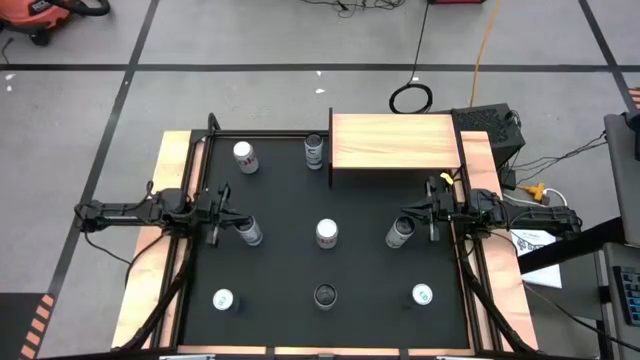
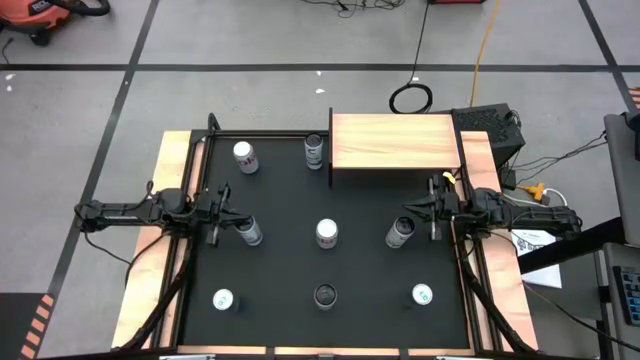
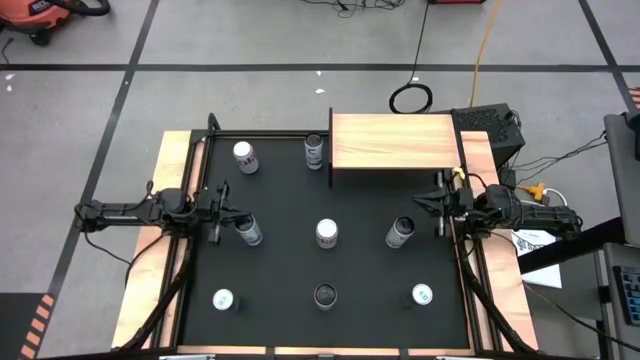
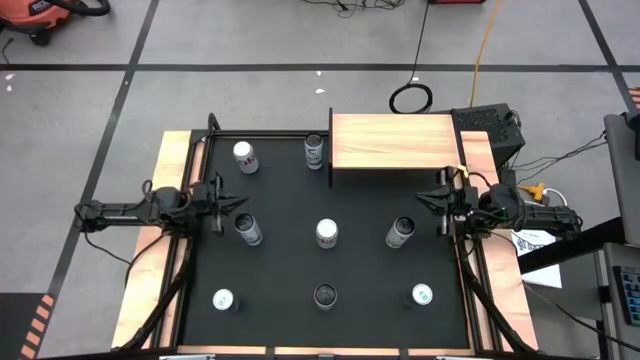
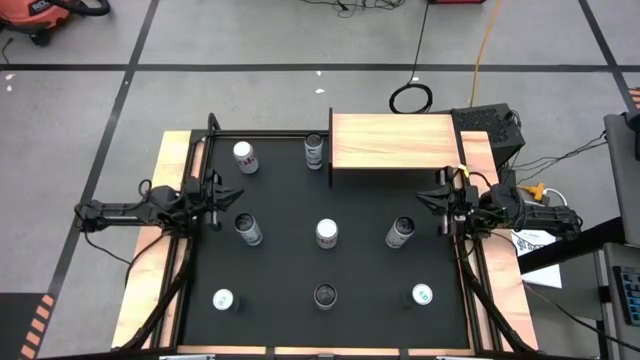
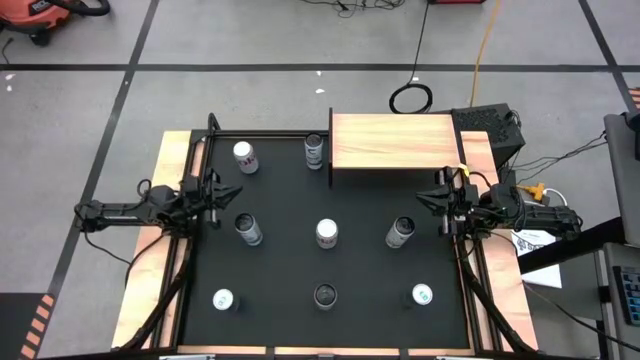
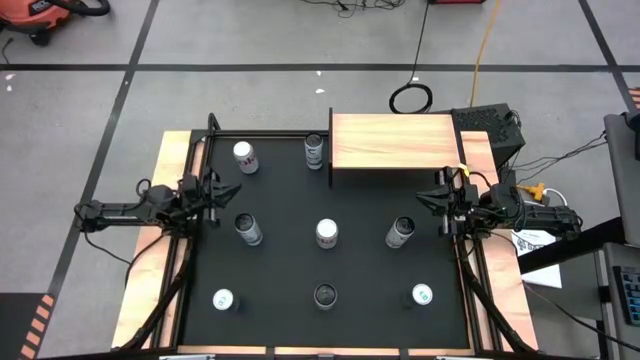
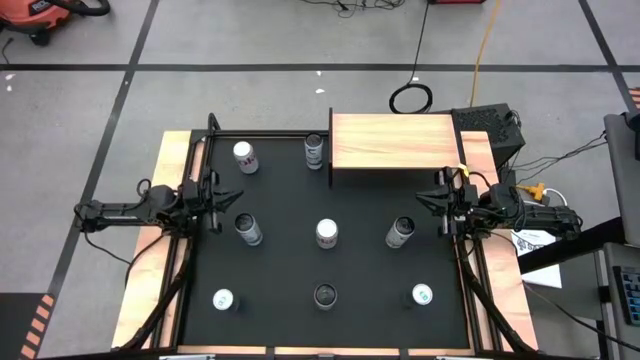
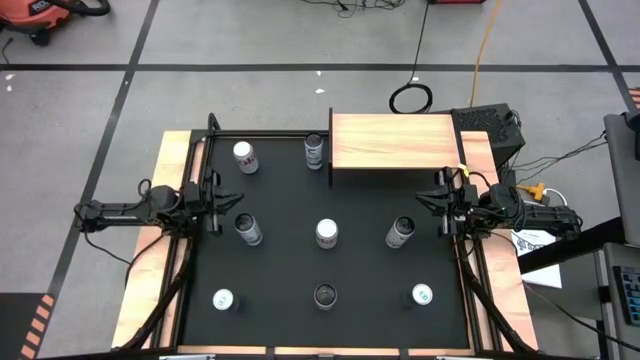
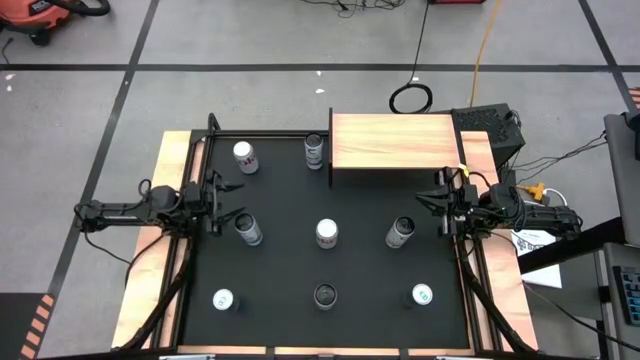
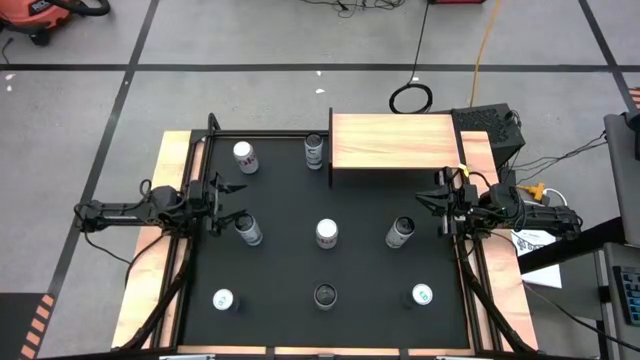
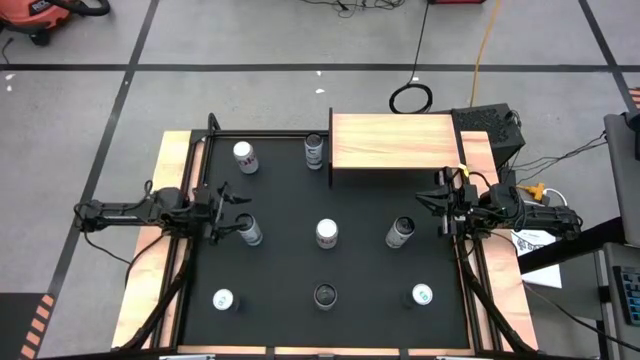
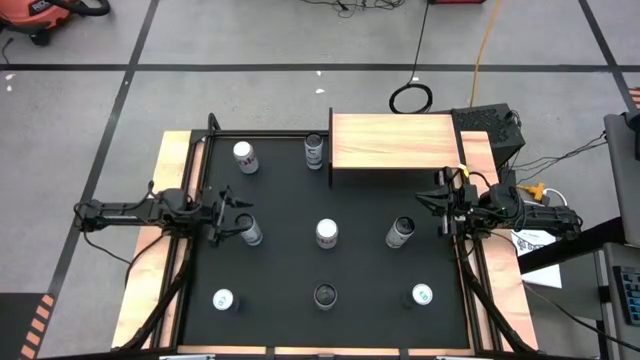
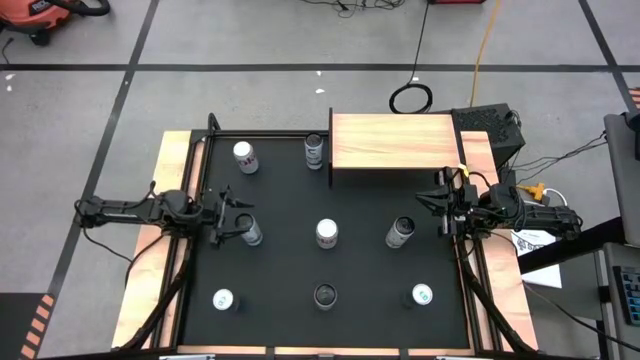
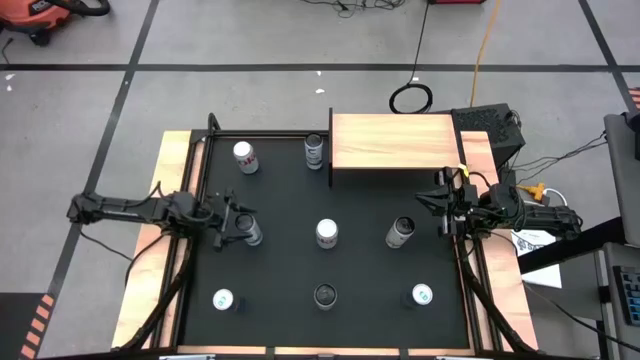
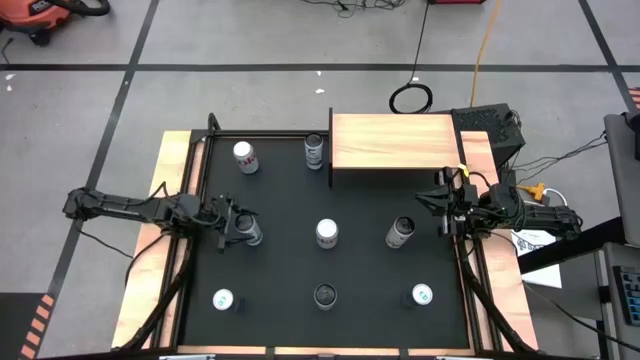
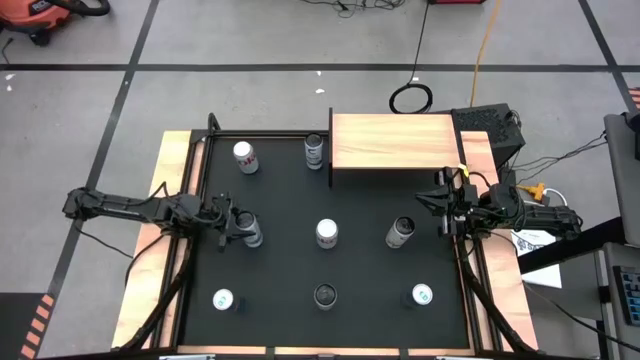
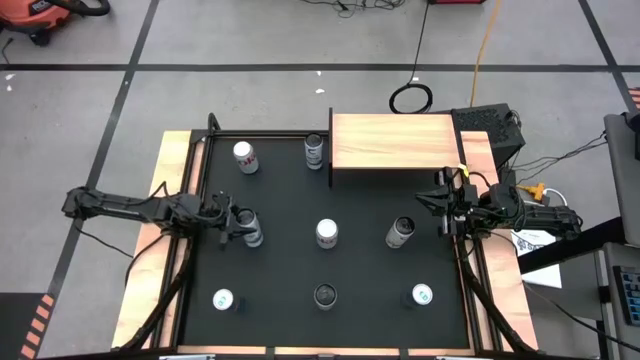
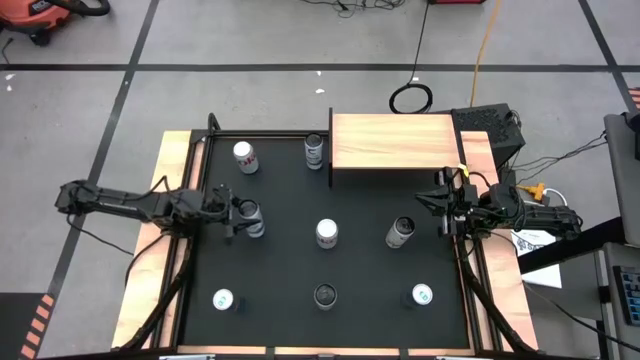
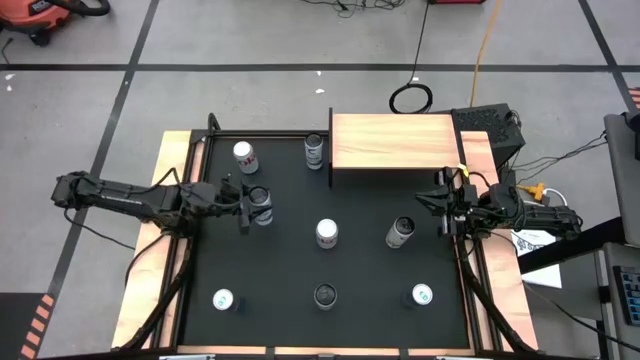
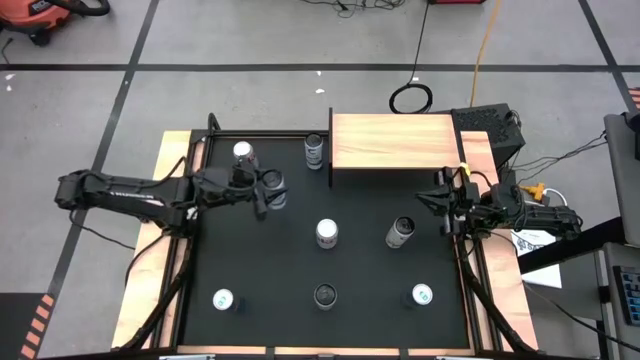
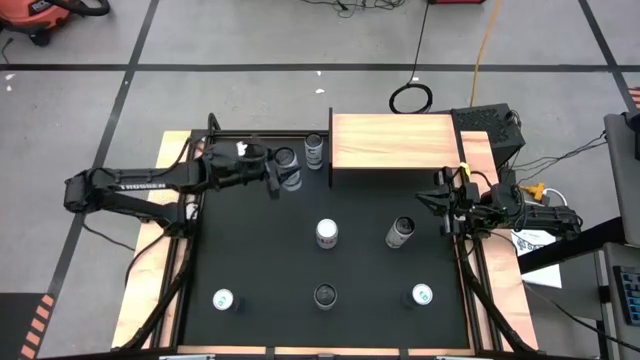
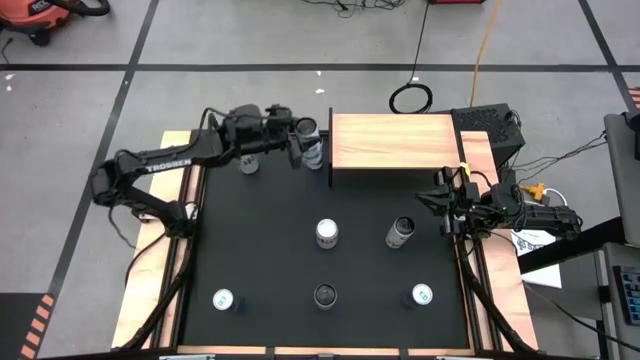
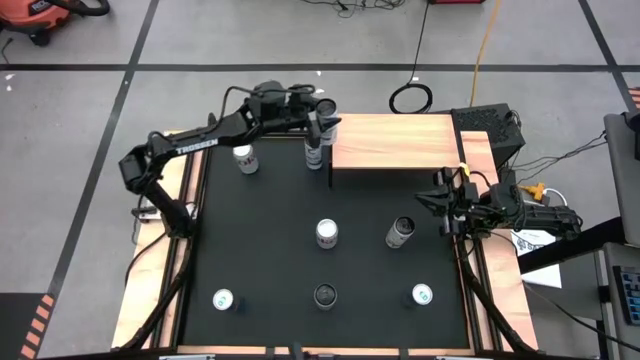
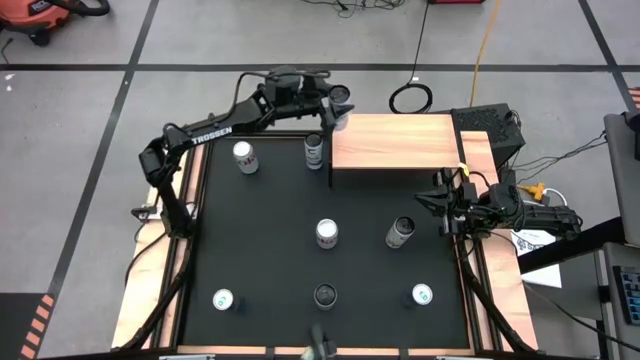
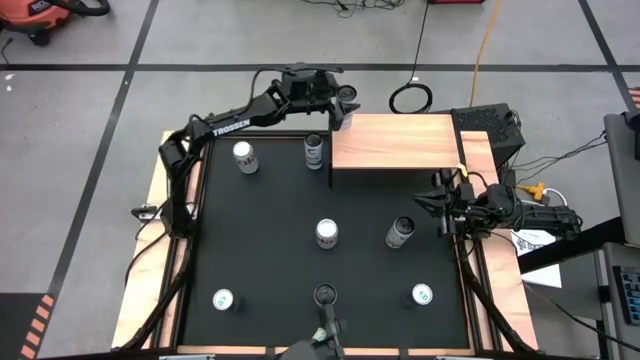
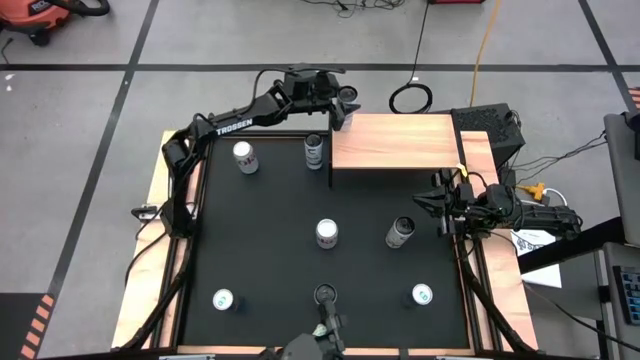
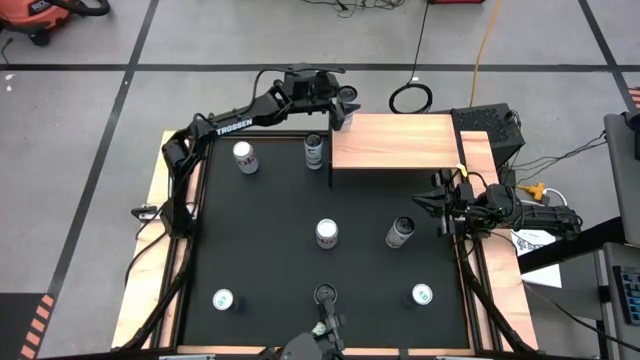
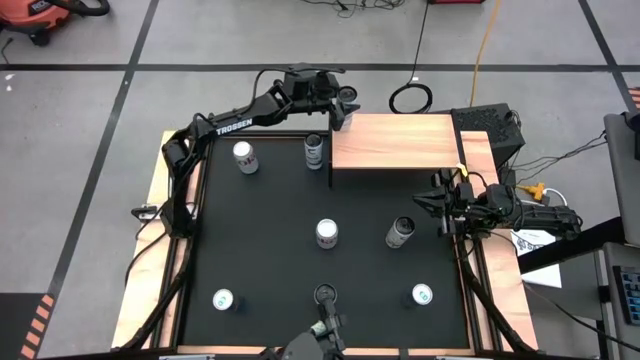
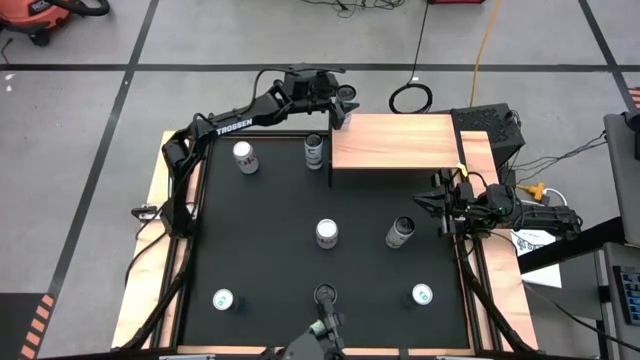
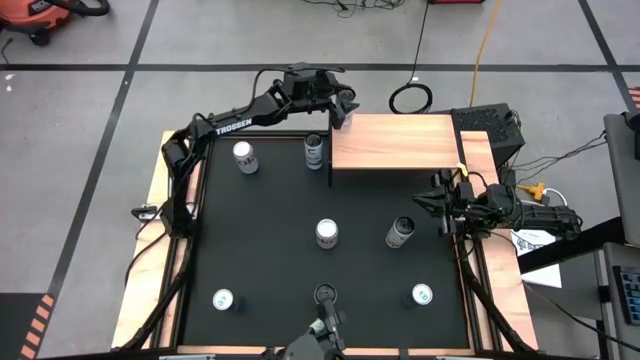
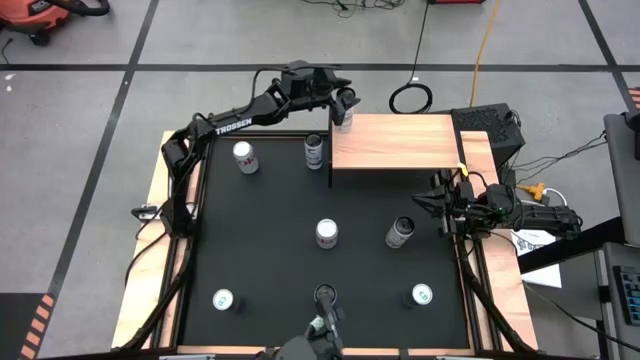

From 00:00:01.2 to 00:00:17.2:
Task: Place canned beverage on shelf
Put the bottom white-blue soda can on the shelf
